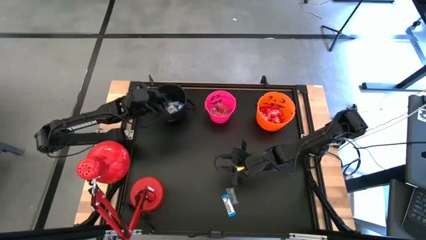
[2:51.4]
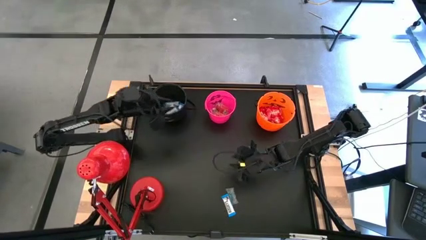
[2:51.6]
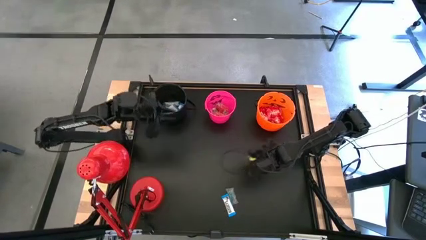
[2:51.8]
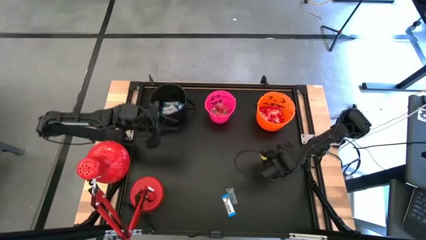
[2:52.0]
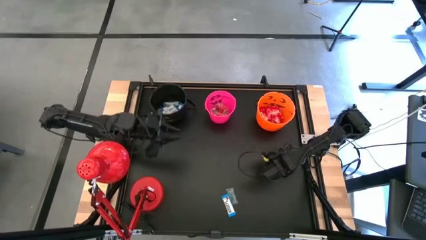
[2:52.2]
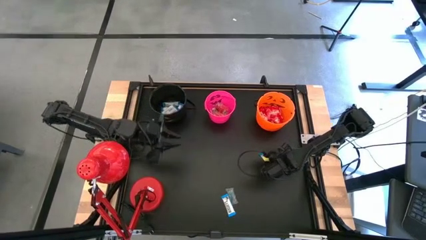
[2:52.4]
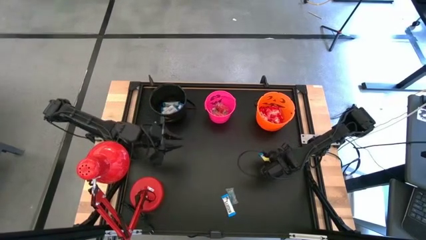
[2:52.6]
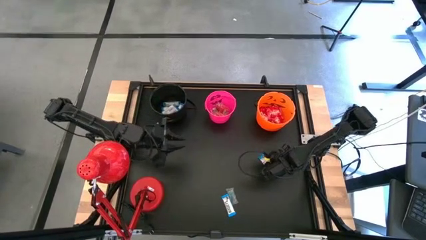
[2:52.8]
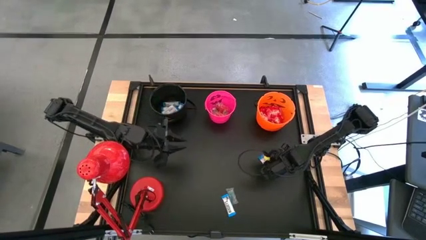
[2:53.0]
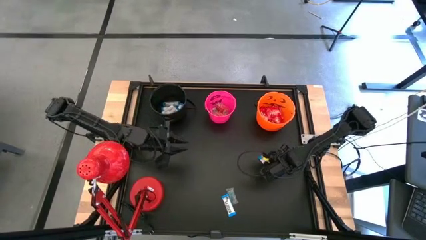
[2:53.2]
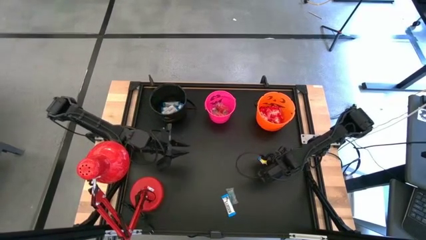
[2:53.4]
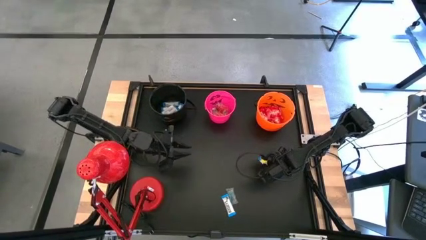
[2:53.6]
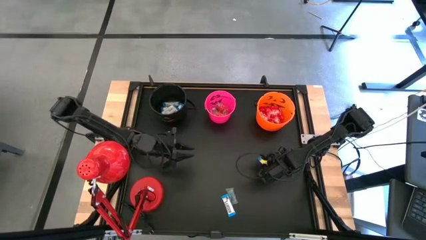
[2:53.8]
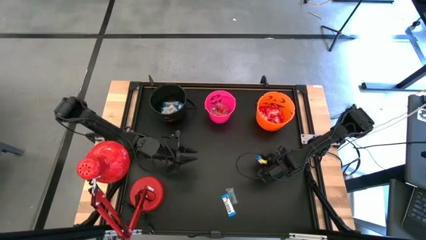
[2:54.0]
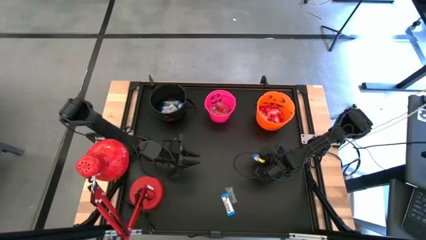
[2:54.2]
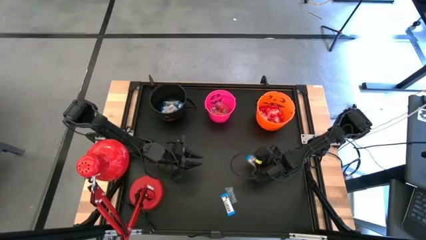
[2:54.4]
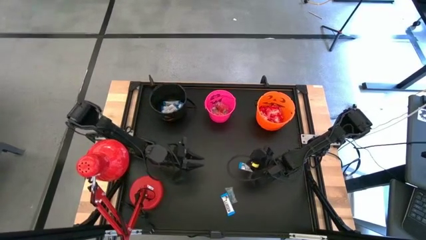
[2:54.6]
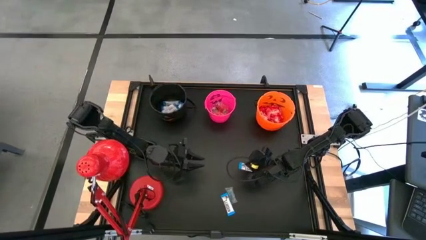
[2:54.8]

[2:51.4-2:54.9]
Task: Organize candy in baskets
Put the white chocolate bar into the black bucket

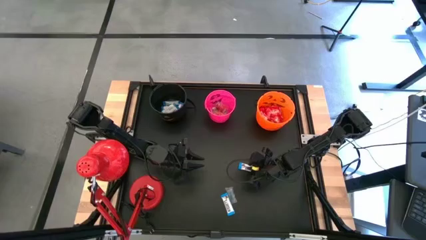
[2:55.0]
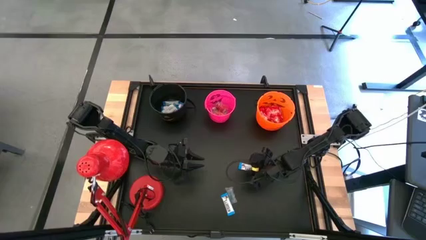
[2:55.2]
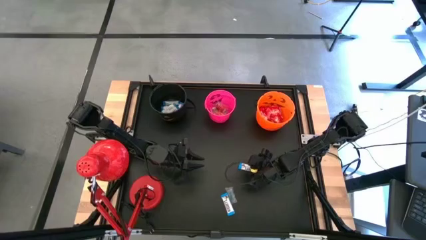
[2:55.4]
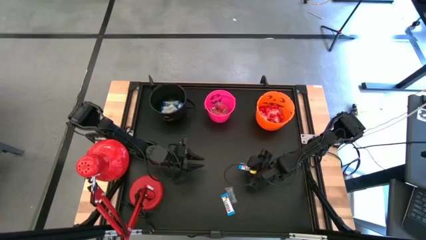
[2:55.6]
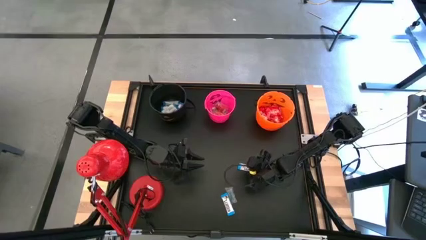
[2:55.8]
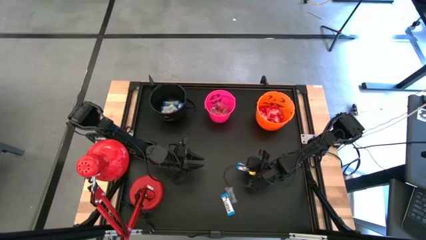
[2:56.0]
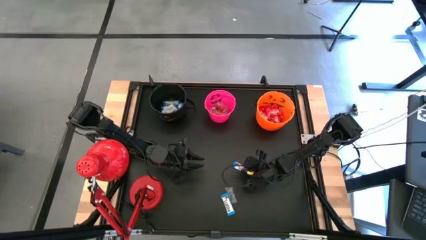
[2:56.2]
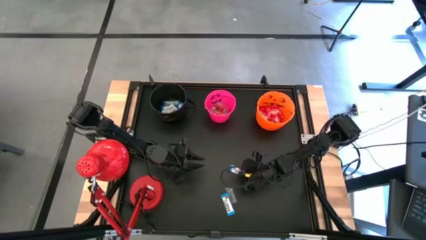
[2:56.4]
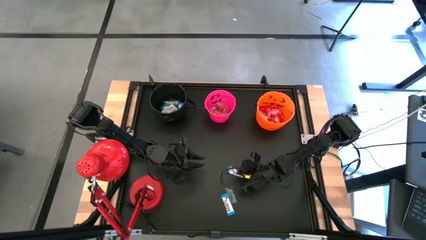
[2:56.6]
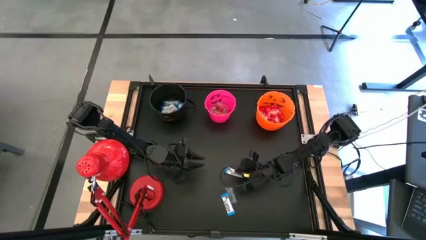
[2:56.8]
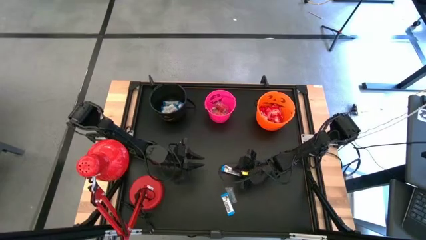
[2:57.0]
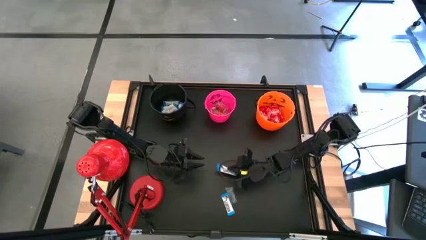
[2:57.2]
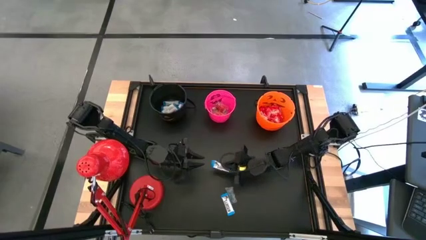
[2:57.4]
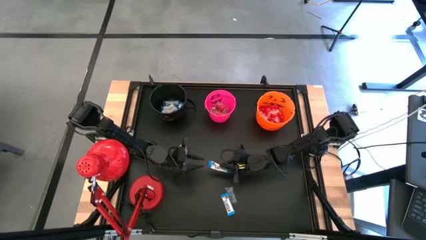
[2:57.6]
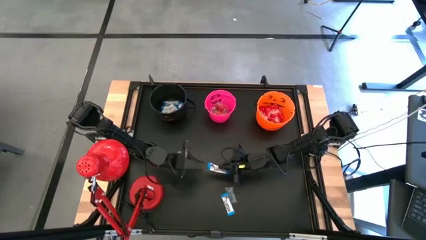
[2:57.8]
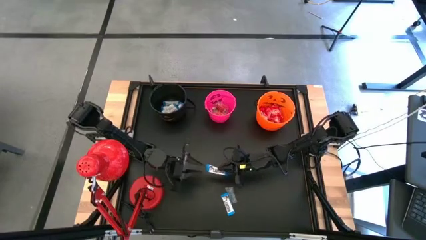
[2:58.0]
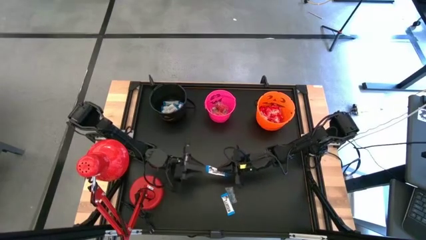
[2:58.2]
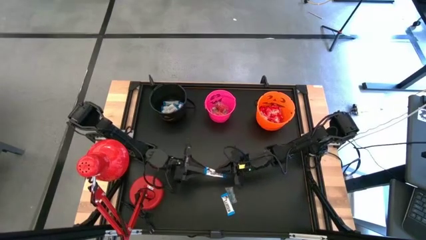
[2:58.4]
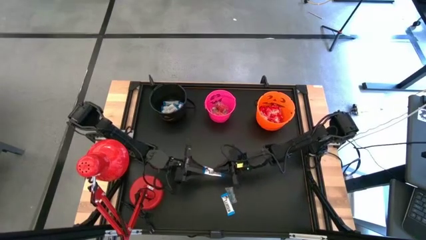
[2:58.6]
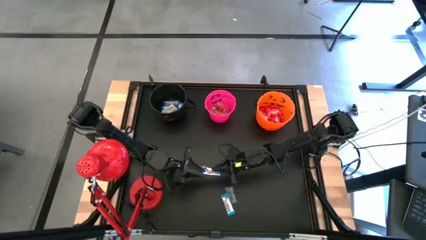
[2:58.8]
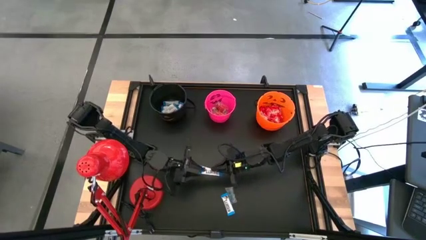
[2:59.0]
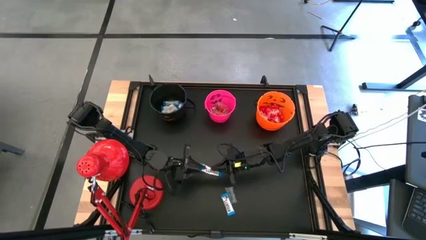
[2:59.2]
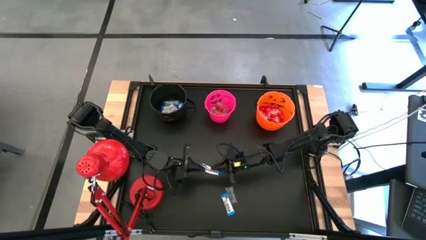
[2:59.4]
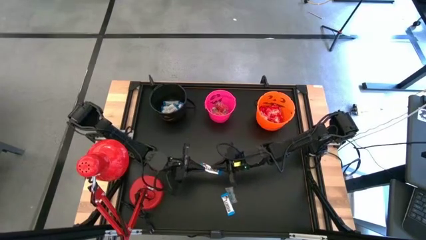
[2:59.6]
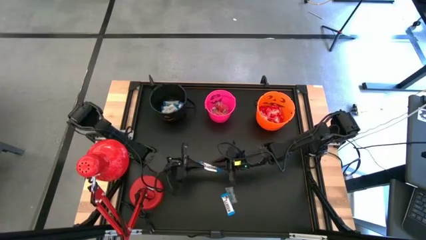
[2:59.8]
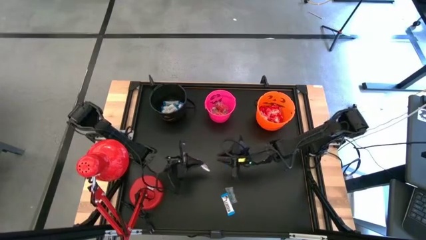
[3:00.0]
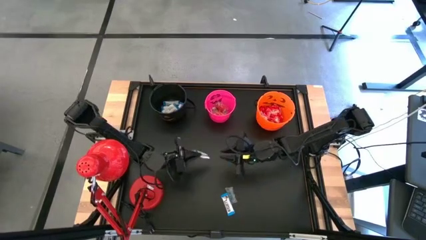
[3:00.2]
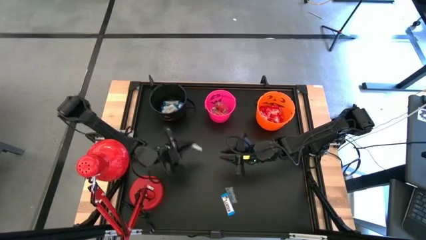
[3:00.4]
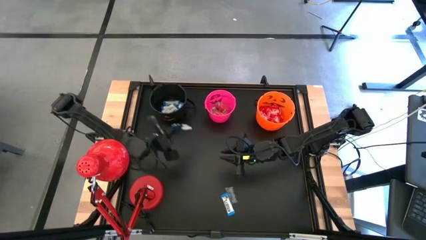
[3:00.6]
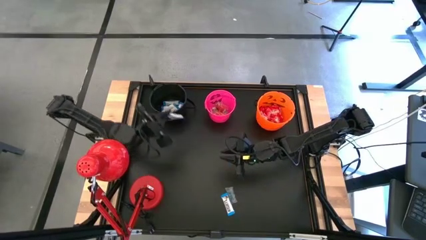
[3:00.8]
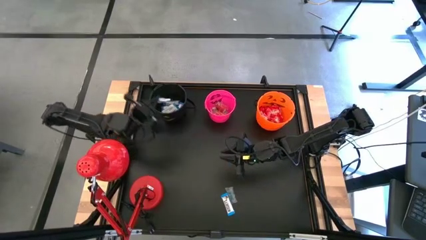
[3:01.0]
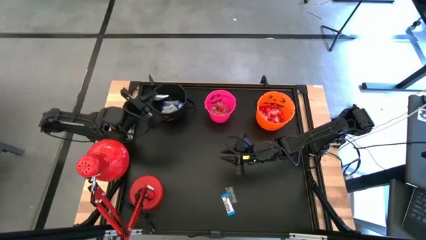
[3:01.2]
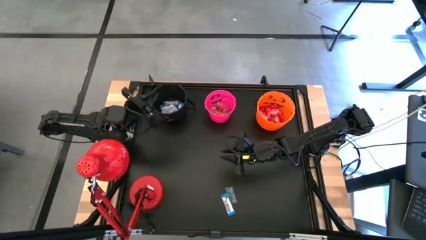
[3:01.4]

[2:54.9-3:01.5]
Put the white chocolate bar into the black bucket

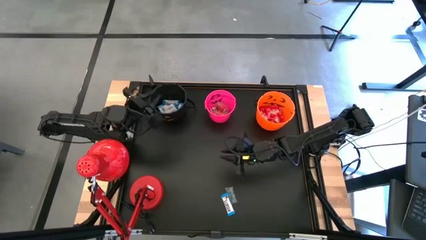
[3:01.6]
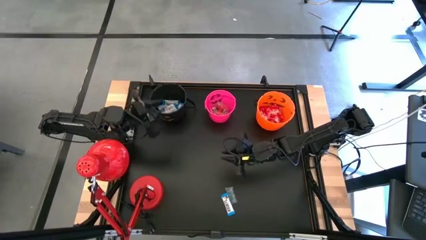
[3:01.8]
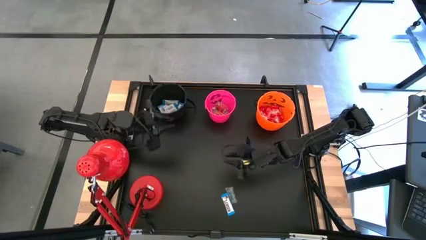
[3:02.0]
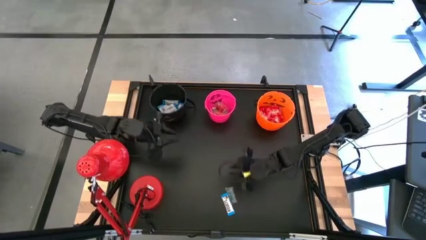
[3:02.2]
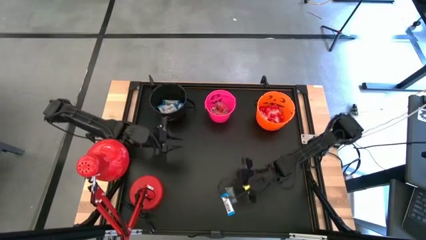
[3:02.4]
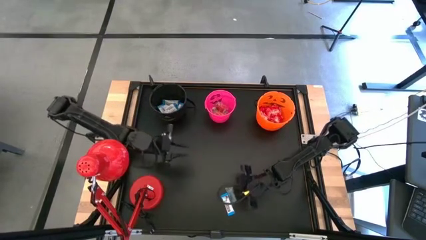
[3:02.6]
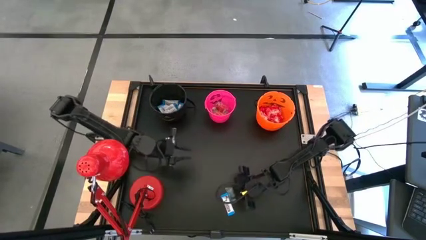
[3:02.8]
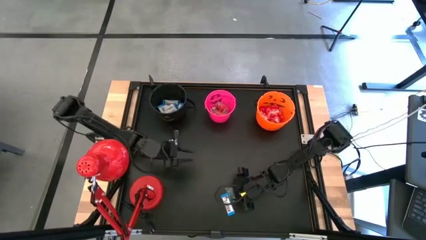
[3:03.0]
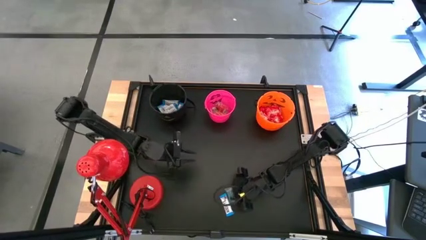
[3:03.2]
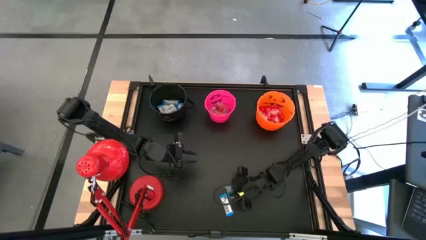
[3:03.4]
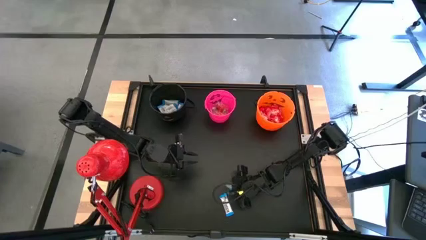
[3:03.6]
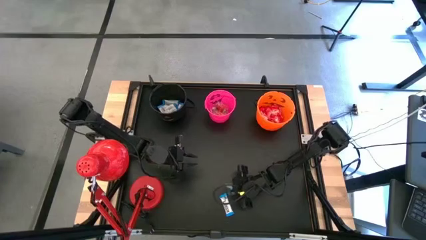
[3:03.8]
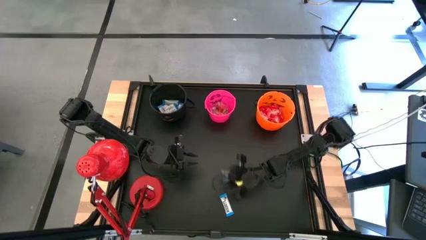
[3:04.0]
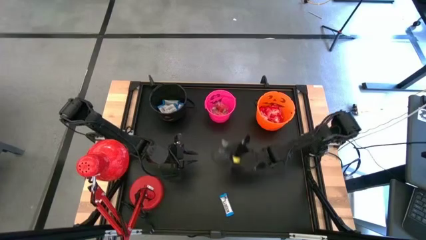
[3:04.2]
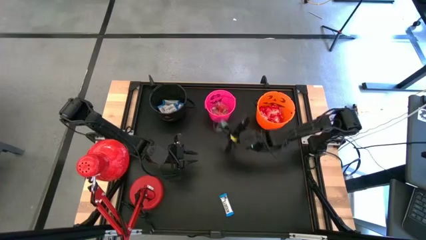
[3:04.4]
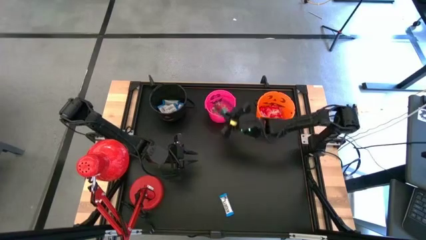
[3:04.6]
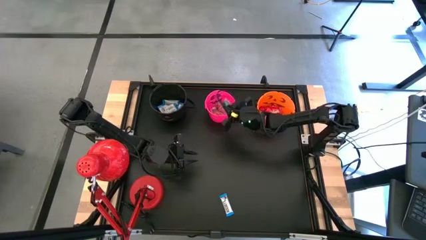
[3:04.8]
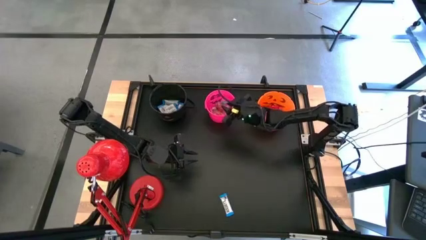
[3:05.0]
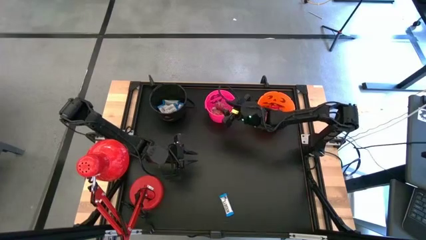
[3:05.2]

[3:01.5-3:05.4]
Put the transparent candy into the pink bucket

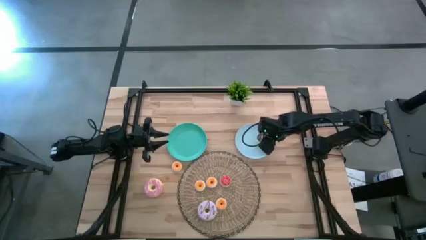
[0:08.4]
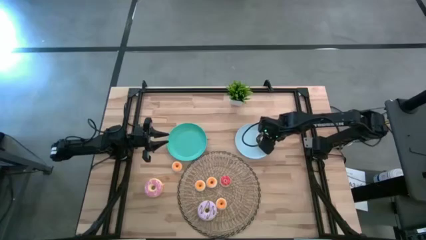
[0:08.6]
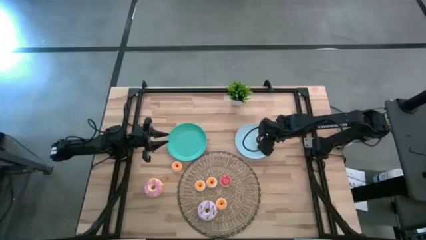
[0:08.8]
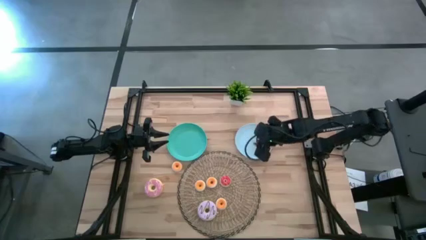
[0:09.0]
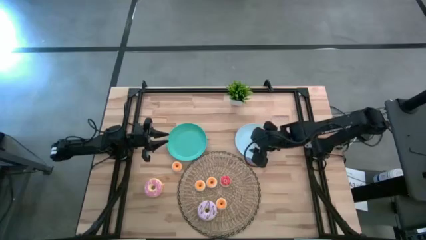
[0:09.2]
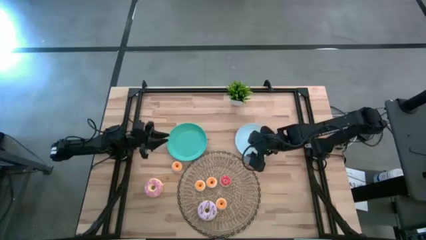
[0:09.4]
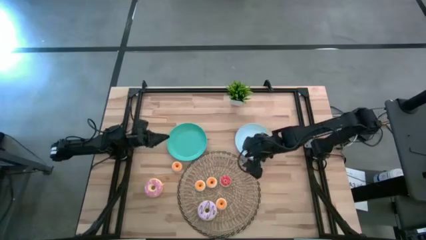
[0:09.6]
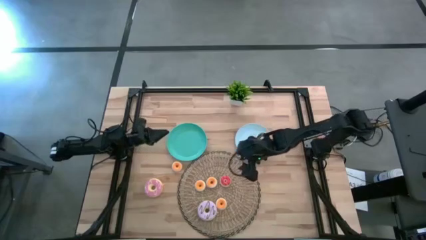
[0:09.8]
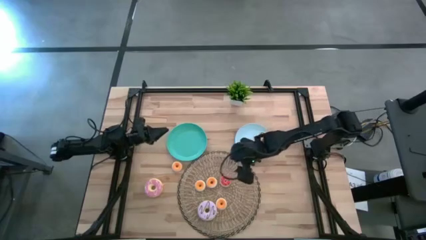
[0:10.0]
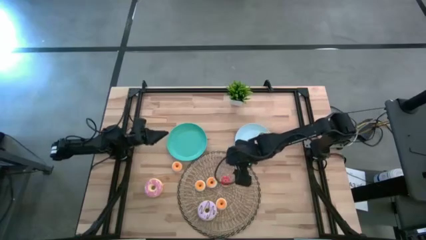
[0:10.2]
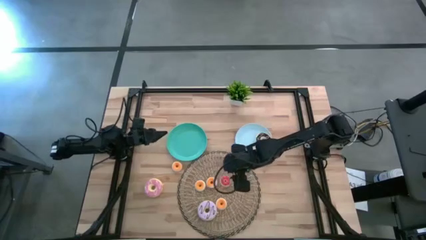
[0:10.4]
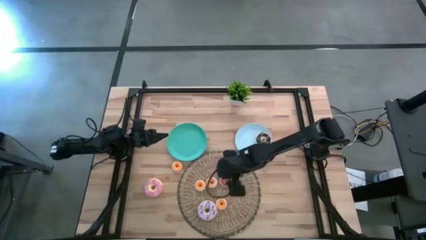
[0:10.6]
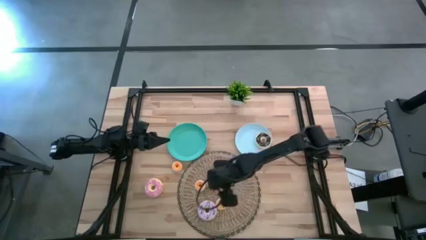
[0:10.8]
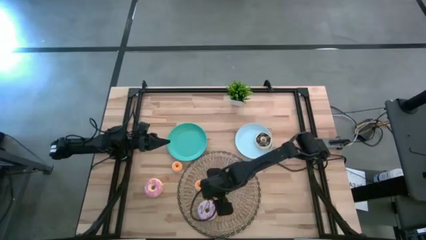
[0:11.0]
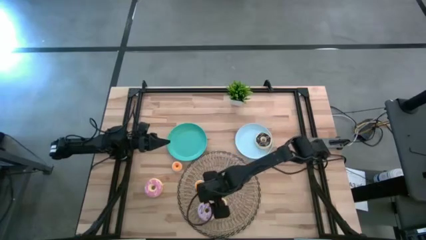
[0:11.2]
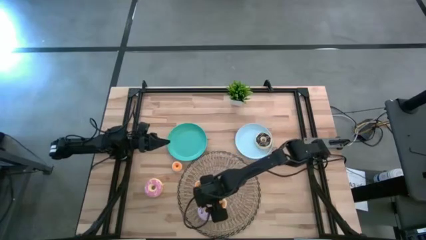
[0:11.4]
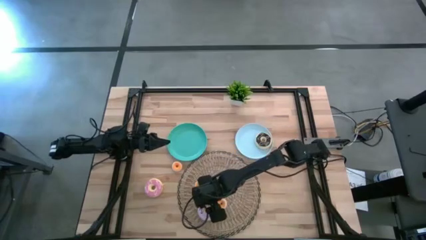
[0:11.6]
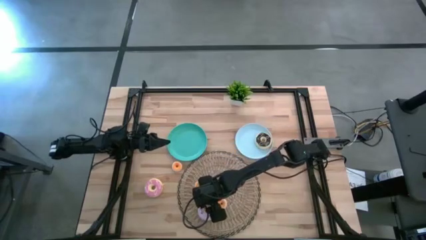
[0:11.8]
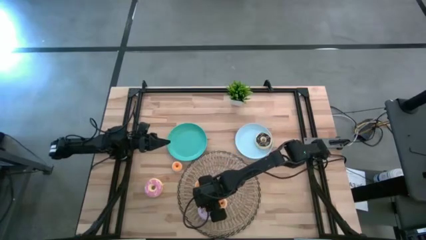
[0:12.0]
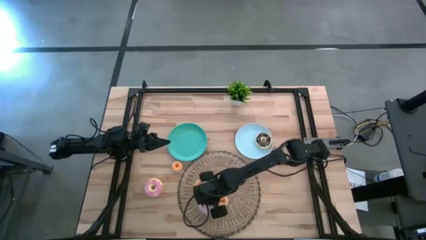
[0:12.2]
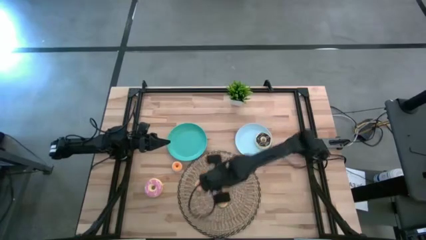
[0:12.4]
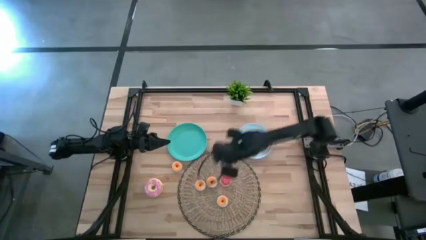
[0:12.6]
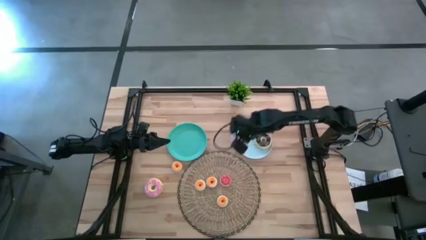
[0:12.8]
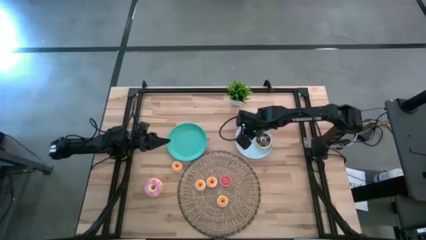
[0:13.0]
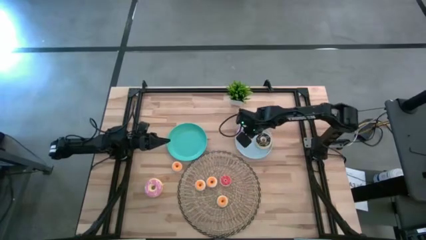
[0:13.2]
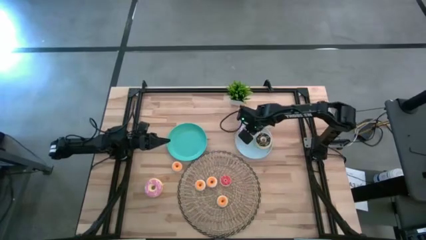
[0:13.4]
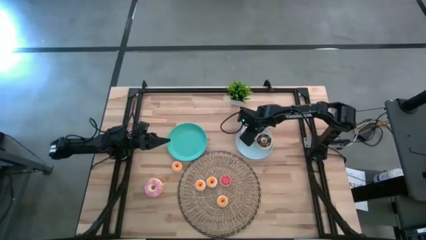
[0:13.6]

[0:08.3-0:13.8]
Task: Pick & Place donuts
Put the big purple doughnut on the light blue plate
